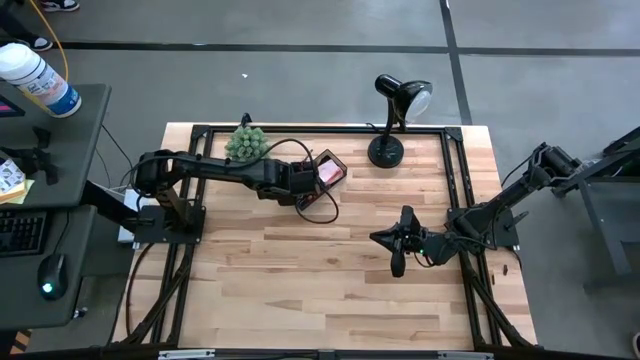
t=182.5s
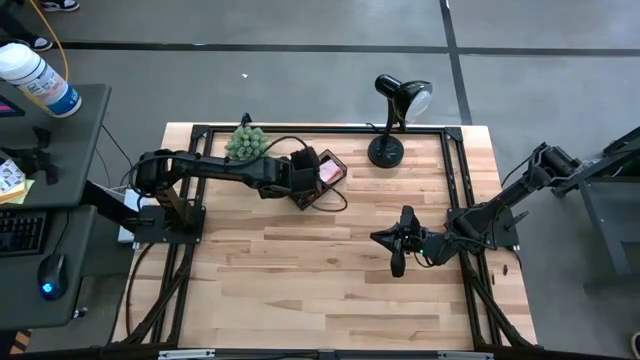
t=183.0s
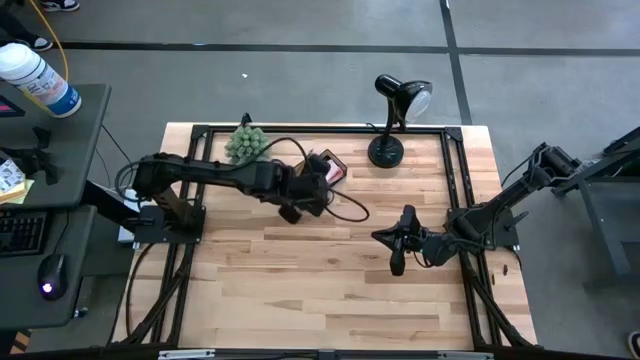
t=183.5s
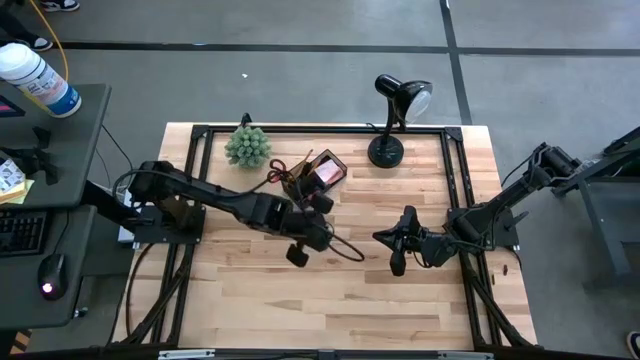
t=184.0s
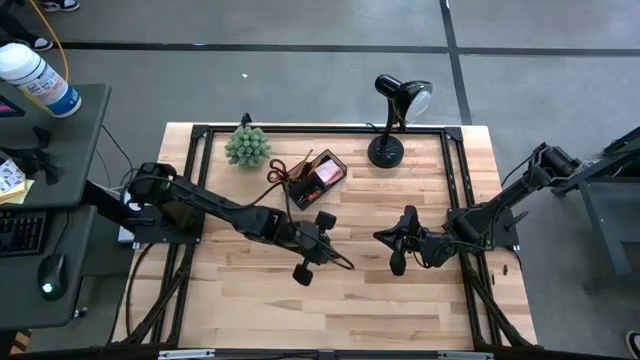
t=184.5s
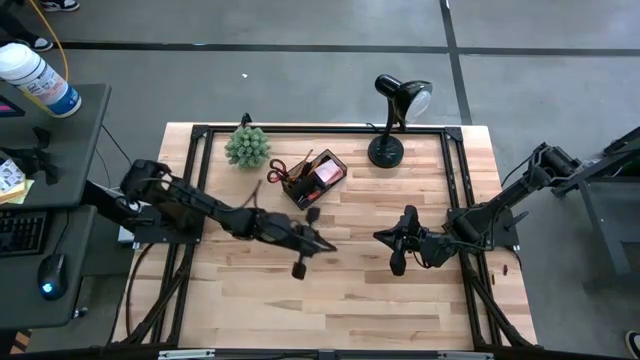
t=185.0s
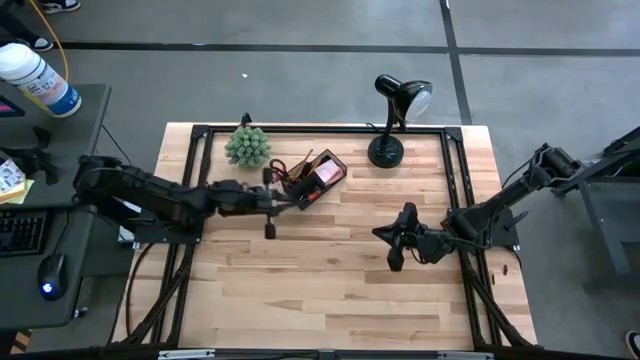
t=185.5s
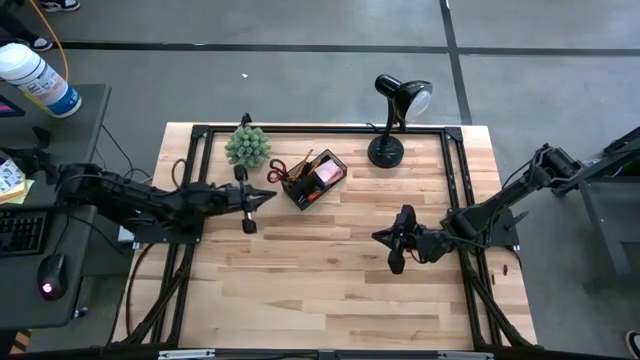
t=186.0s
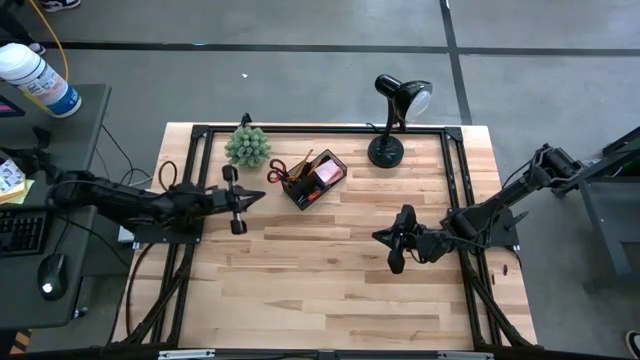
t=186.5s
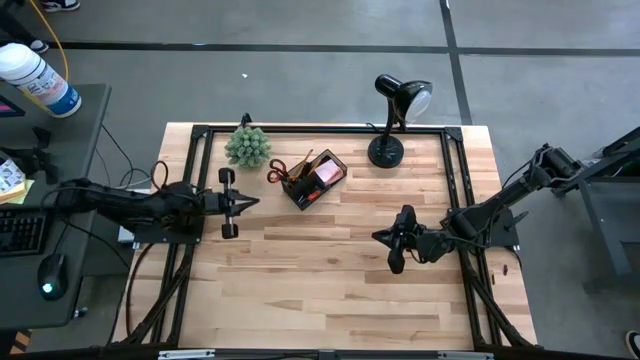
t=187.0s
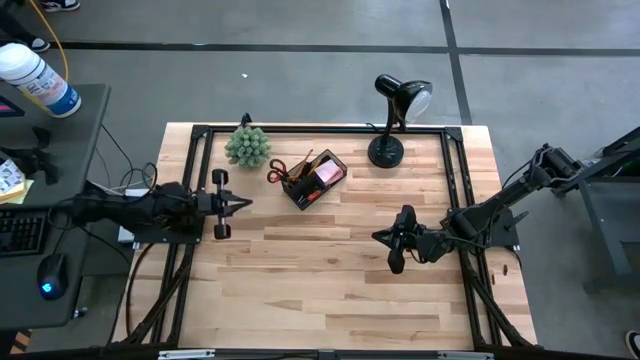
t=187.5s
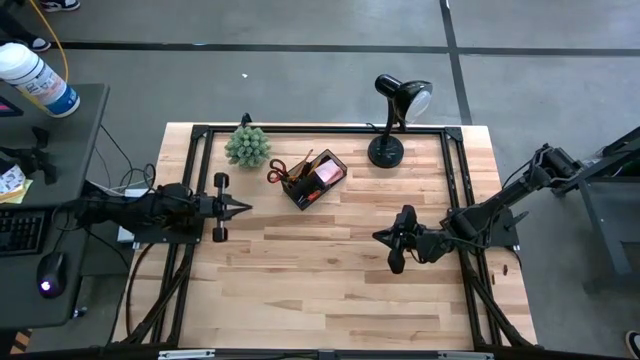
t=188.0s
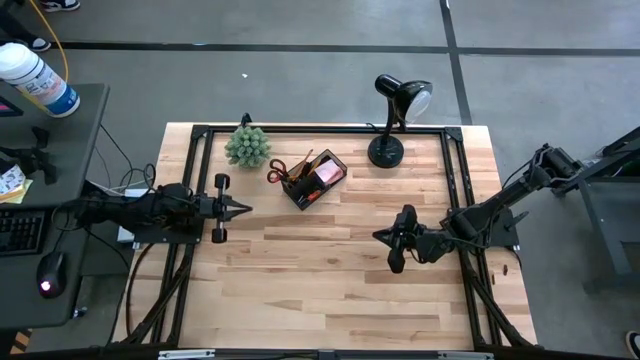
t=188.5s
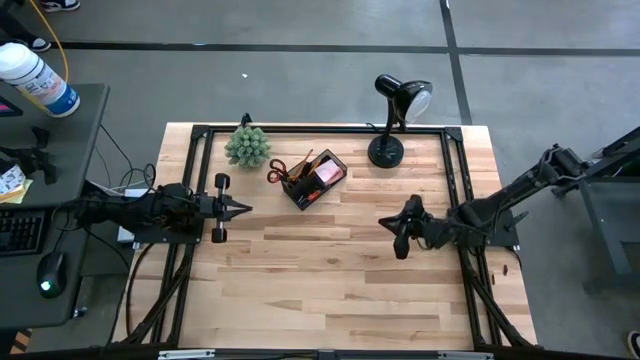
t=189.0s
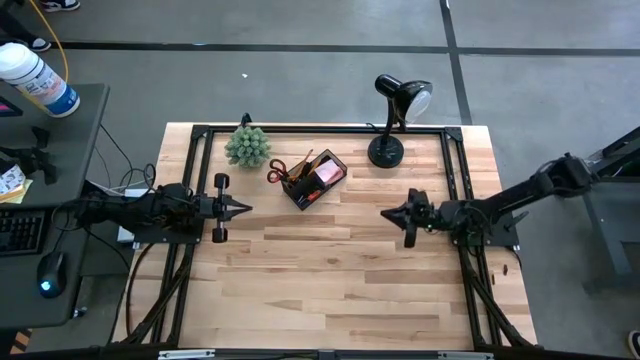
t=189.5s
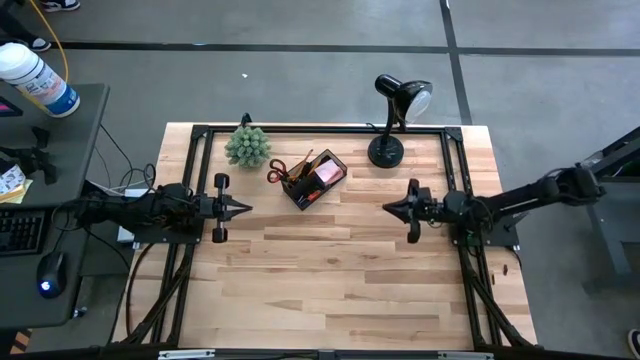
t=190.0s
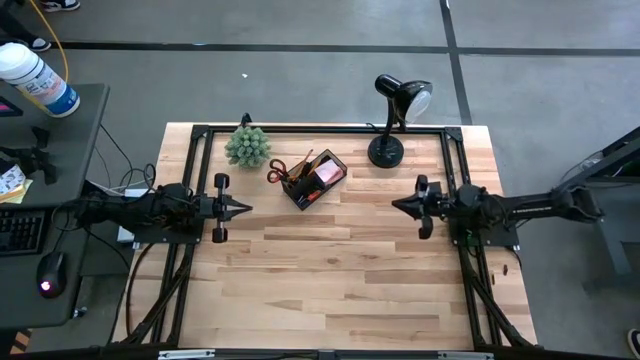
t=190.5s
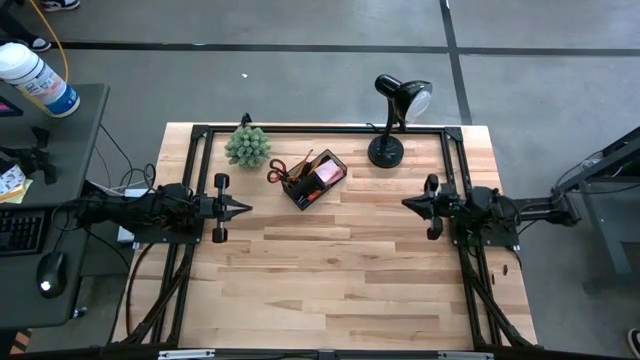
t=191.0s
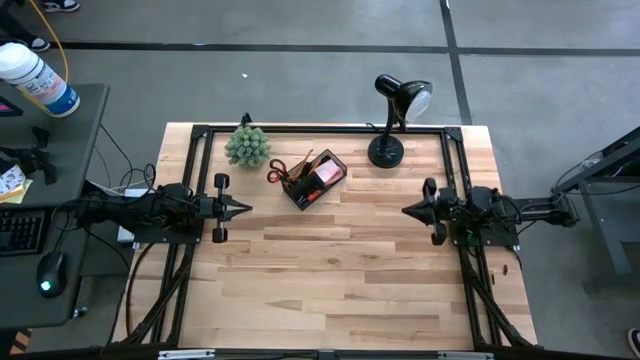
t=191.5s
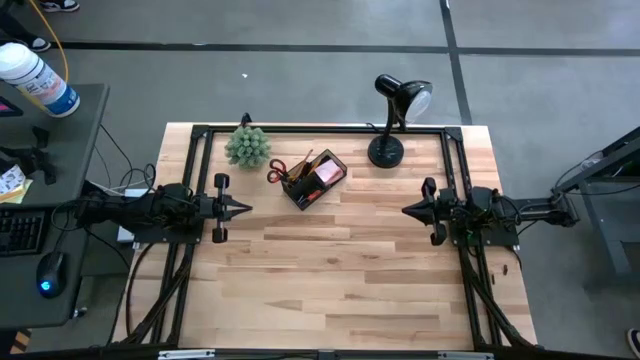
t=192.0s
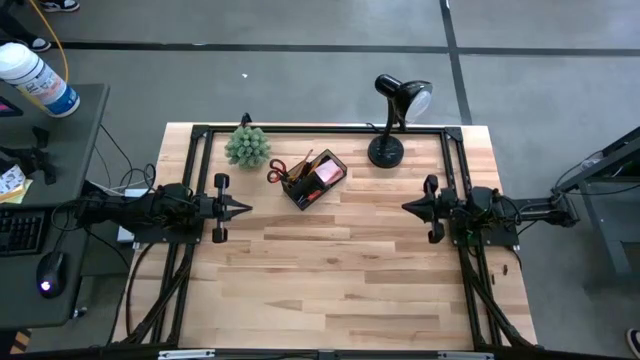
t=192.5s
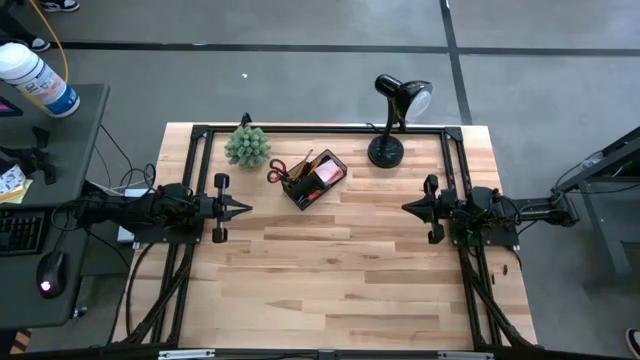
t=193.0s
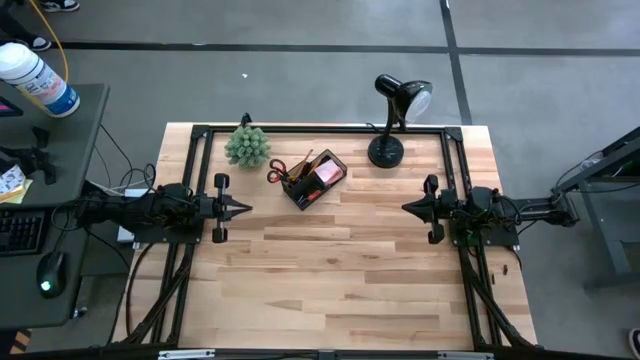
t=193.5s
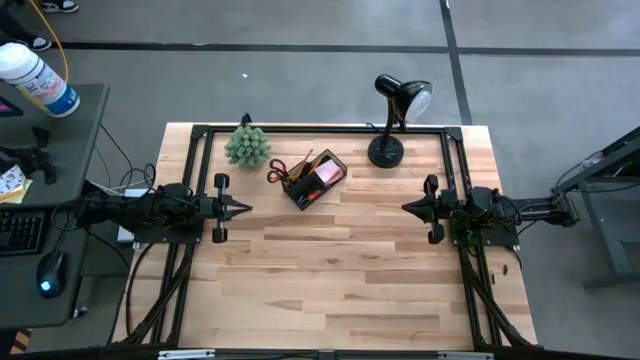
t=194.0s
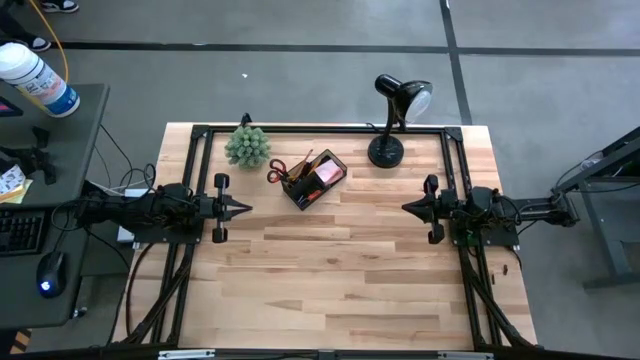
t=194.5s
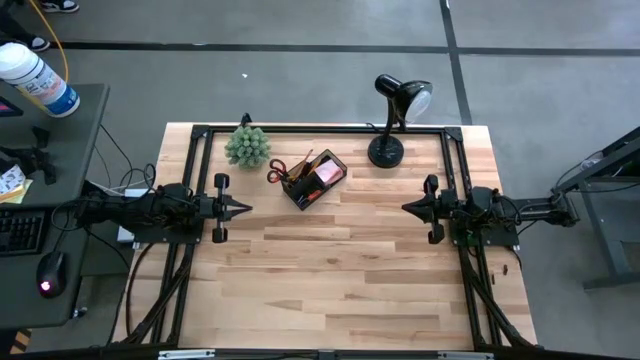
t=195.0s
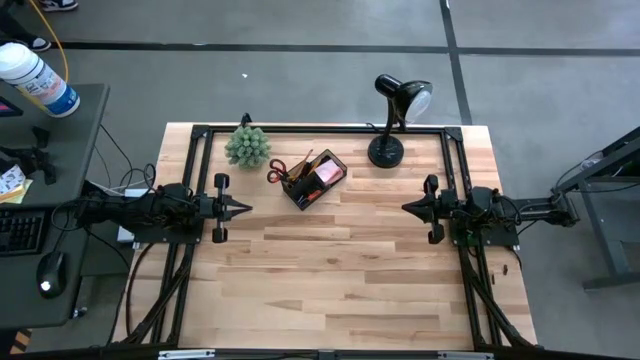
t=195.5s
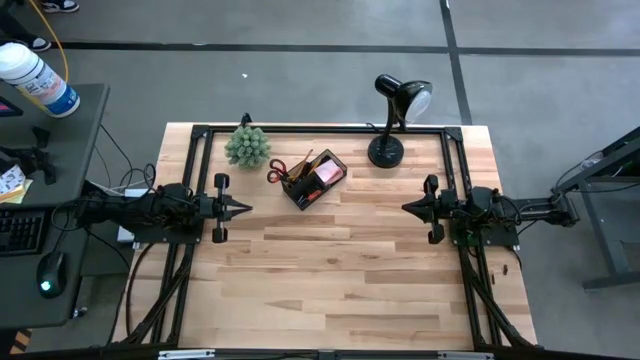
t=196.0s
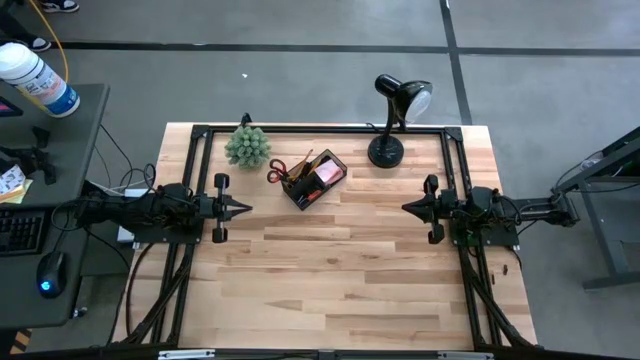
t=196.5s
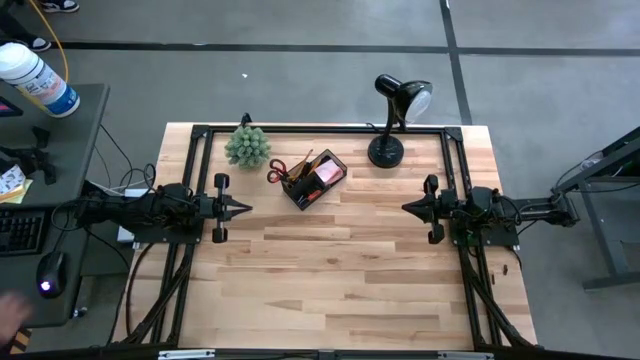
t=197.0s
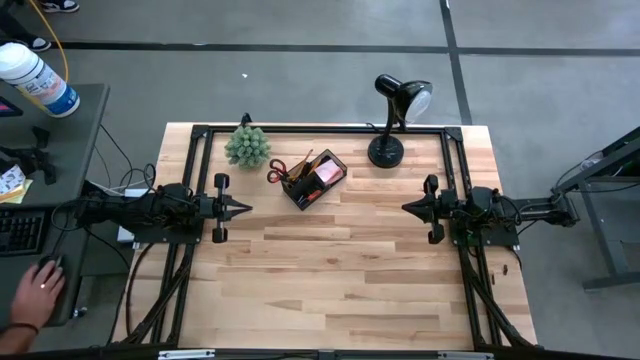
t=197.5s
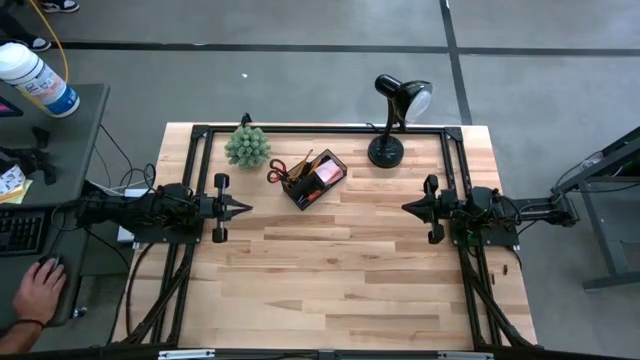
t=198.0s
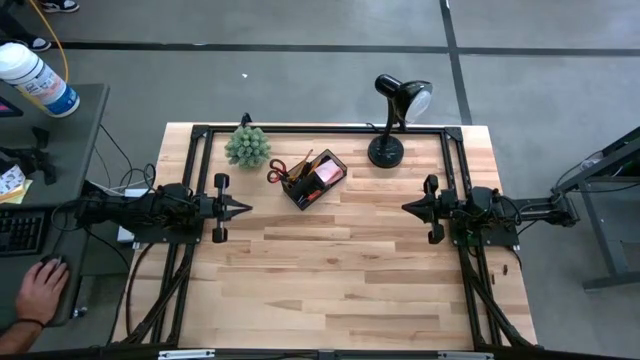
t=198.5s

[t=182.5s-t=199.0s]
Task: Pick and place office supplies into organizer
Return to Home Position

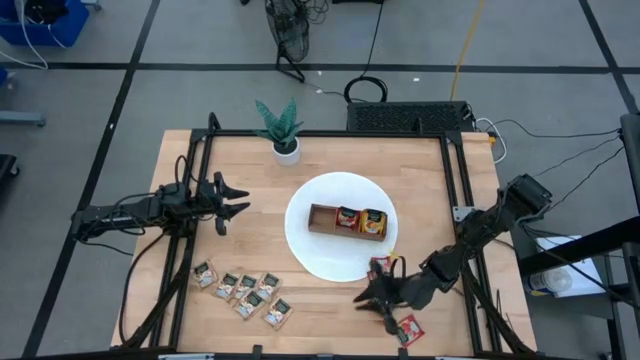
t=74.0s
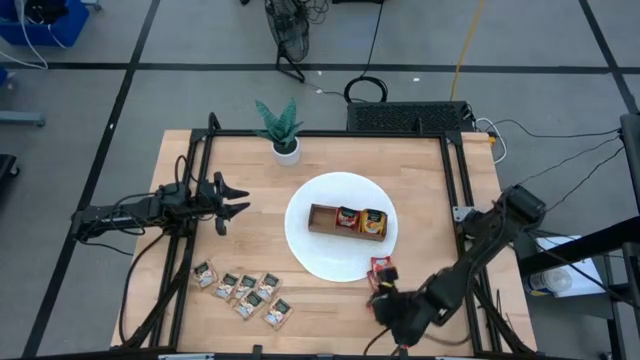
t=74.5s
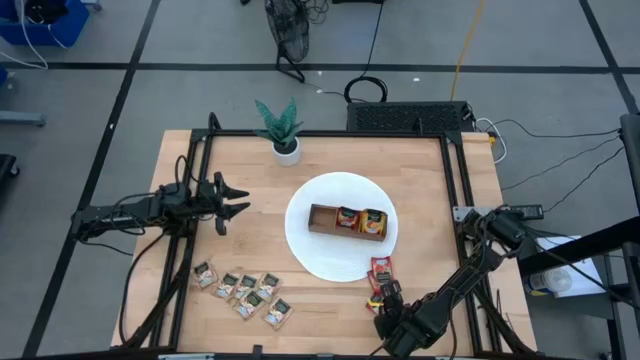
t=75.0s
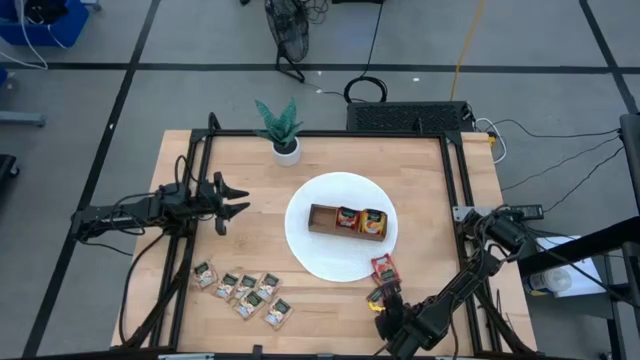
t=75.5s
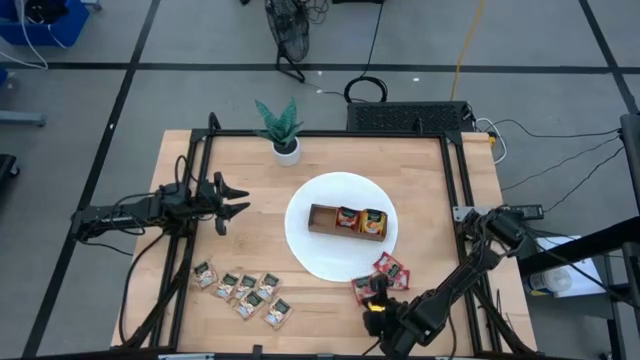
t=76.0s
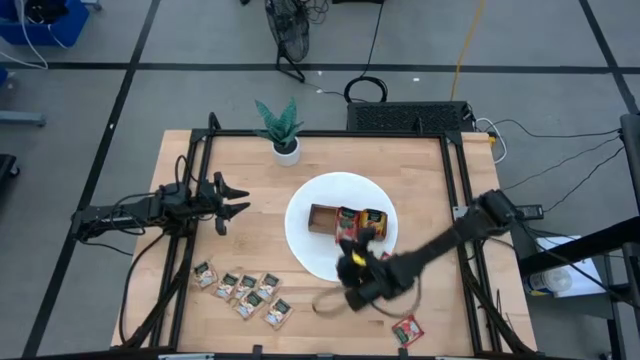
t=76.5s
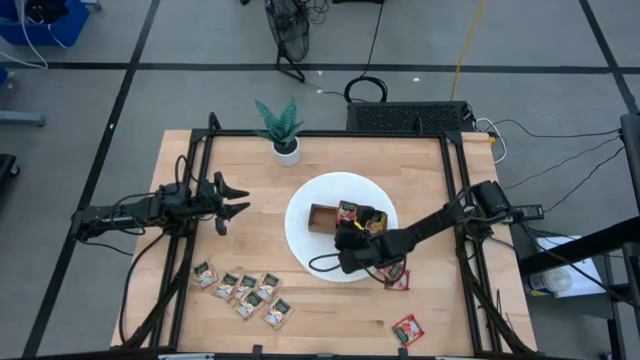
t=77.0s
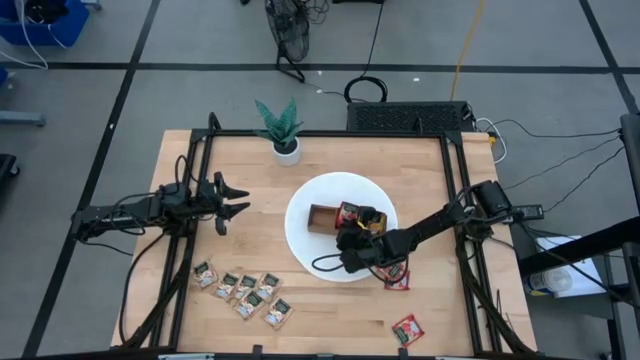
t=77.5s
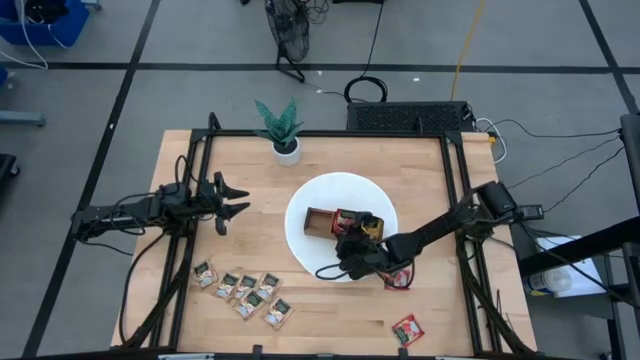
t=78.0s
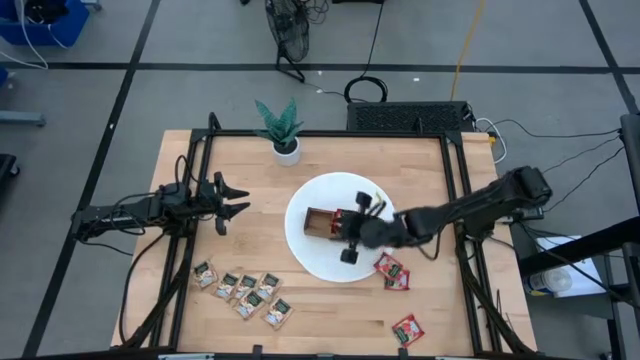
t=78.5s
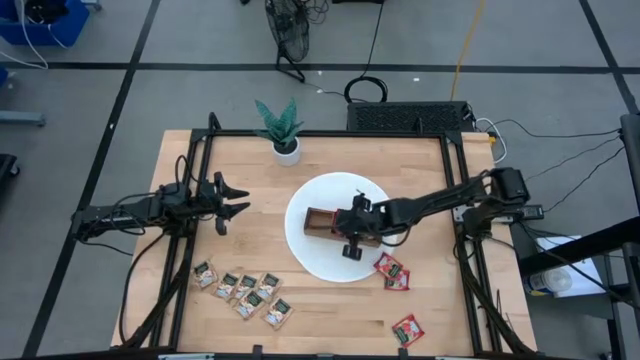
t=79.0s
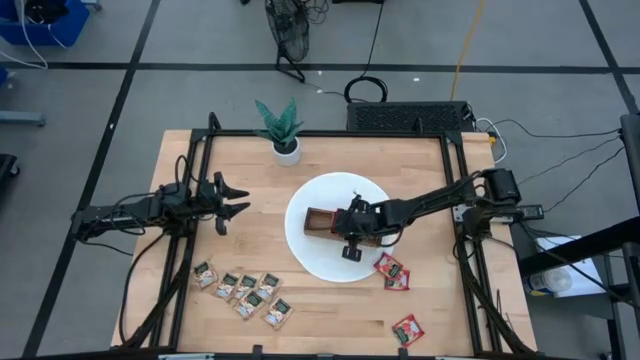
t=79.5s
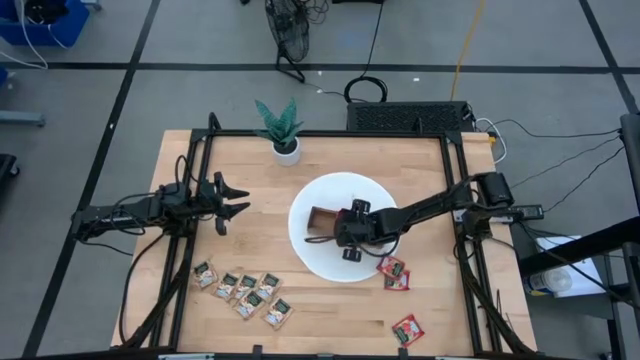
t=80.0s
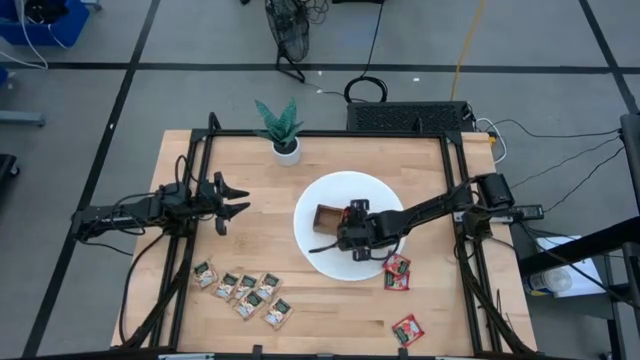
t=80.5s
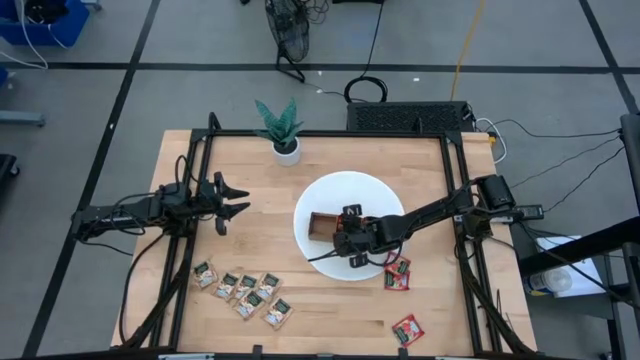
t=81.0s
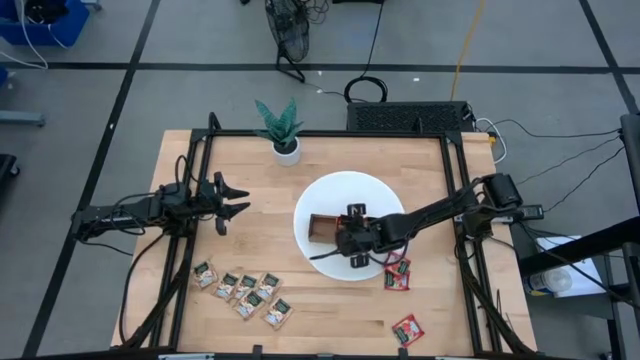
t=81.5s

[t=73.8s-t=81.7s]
Task: Pick & Place Tea
Put the red tea bag into the middle section of the wooden organizer
